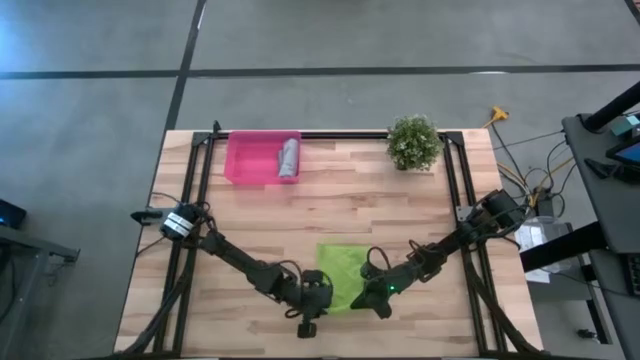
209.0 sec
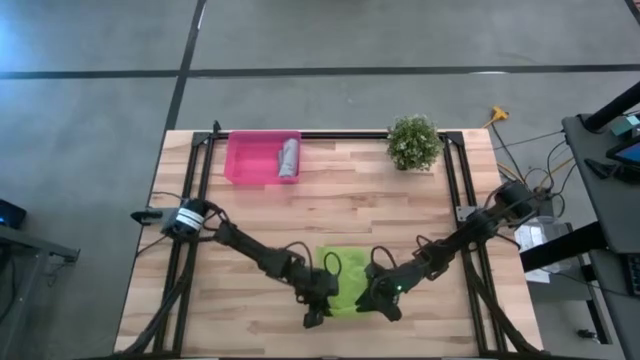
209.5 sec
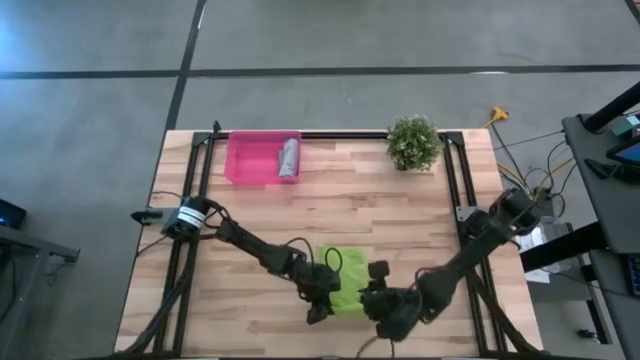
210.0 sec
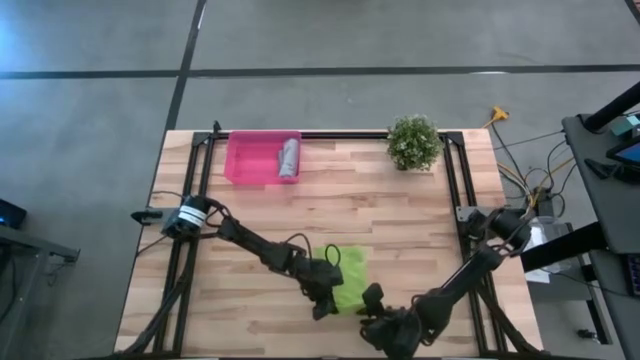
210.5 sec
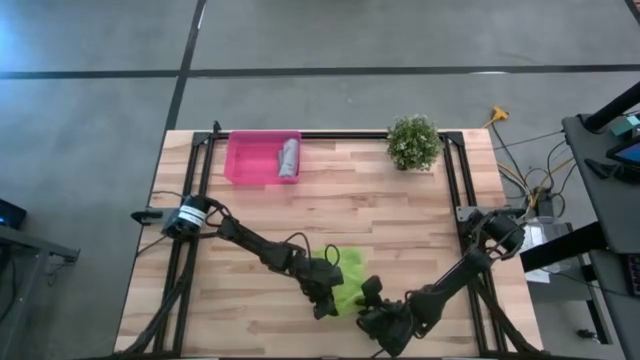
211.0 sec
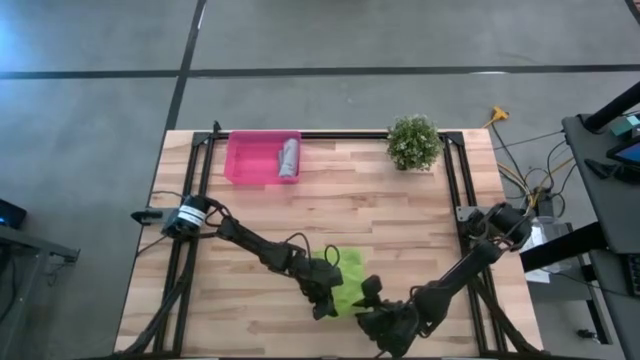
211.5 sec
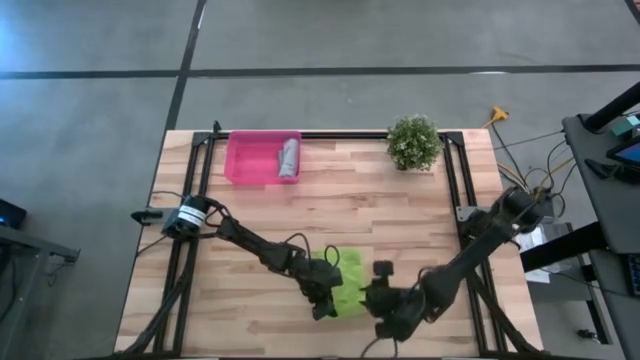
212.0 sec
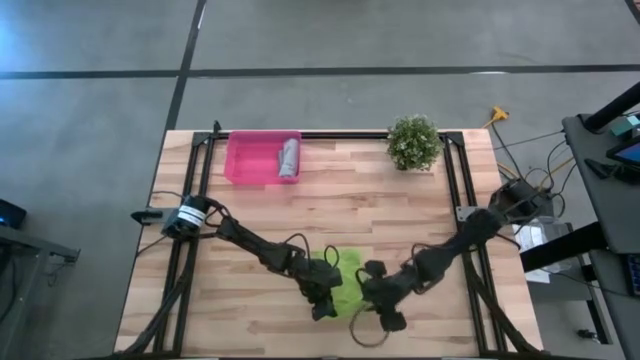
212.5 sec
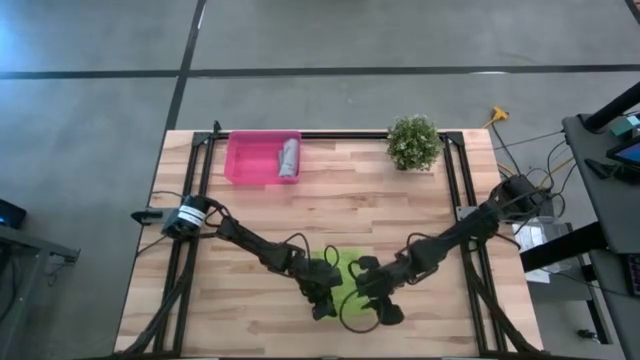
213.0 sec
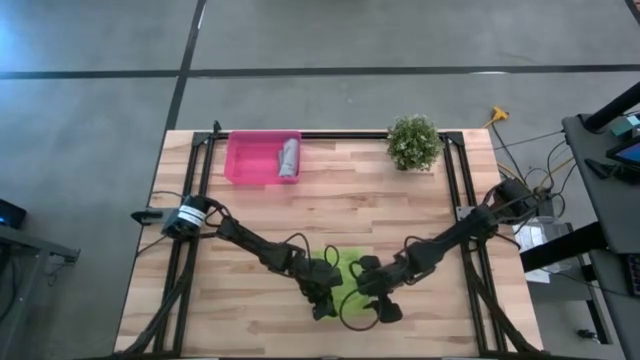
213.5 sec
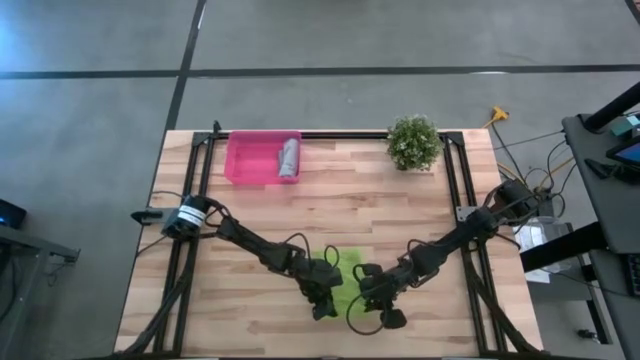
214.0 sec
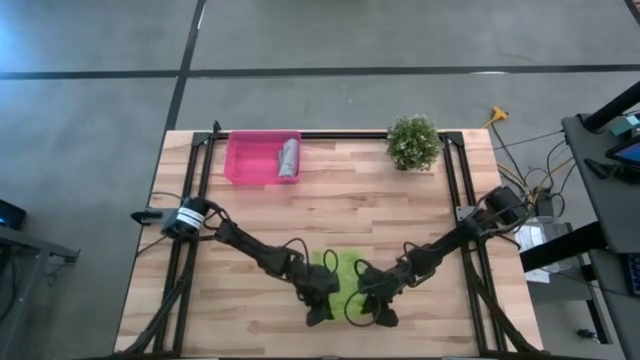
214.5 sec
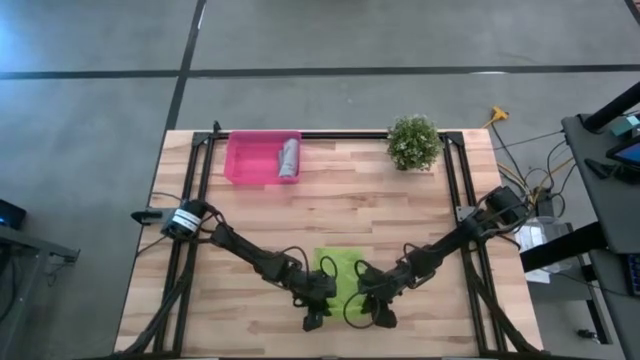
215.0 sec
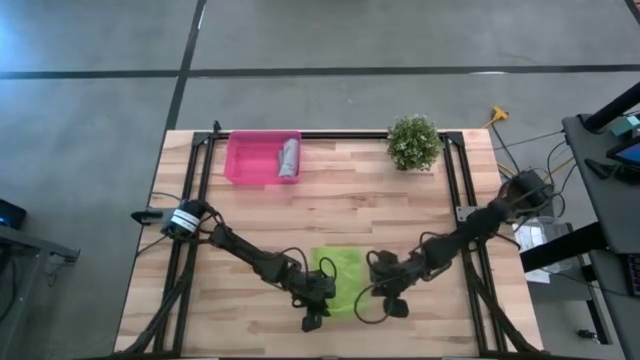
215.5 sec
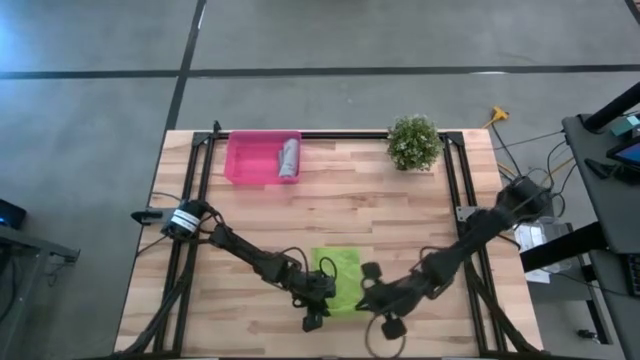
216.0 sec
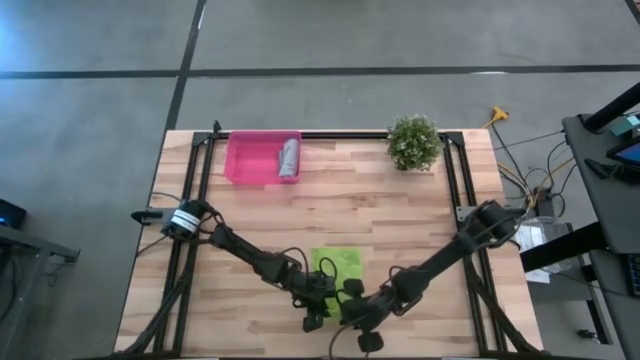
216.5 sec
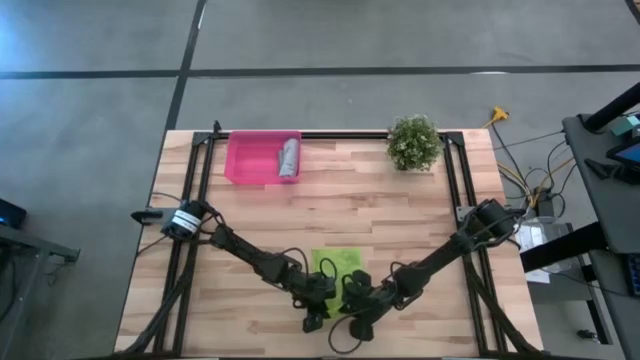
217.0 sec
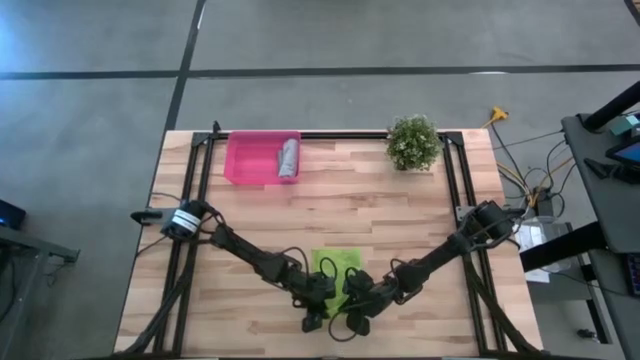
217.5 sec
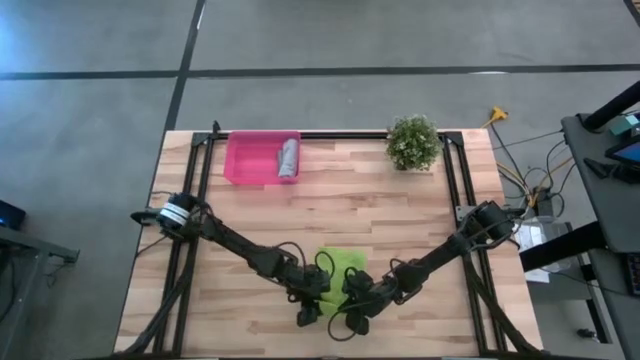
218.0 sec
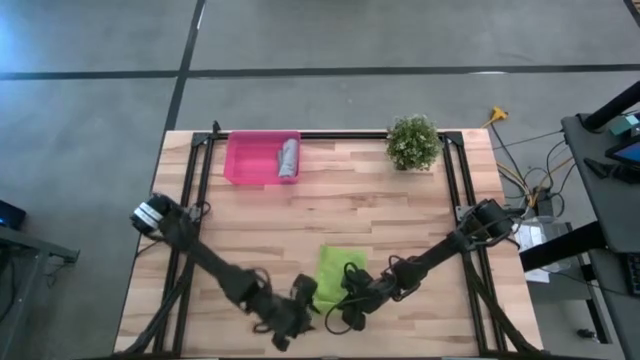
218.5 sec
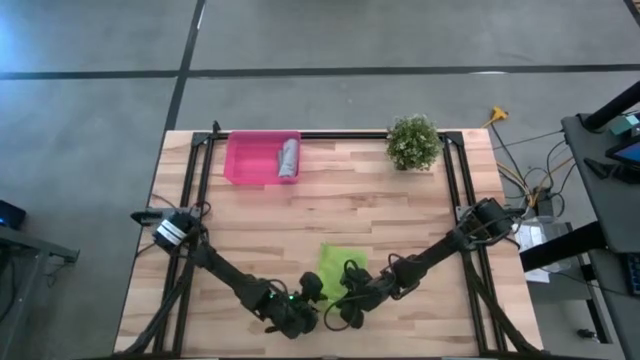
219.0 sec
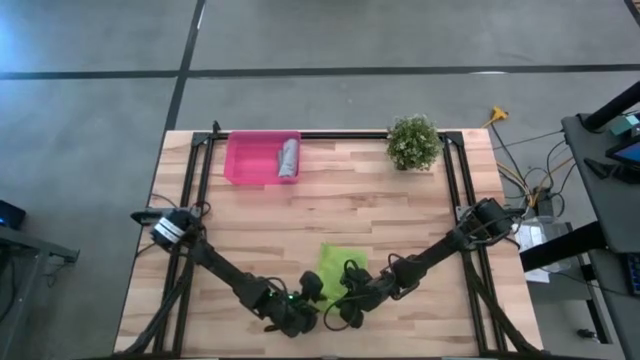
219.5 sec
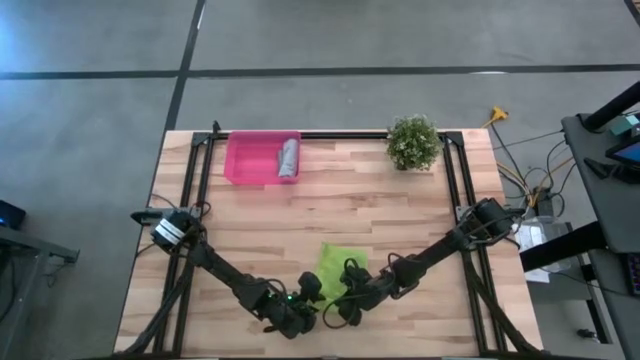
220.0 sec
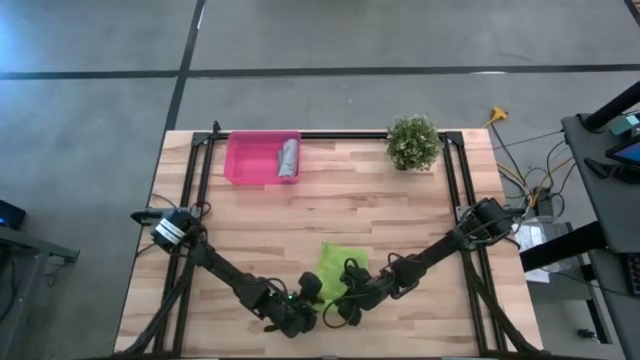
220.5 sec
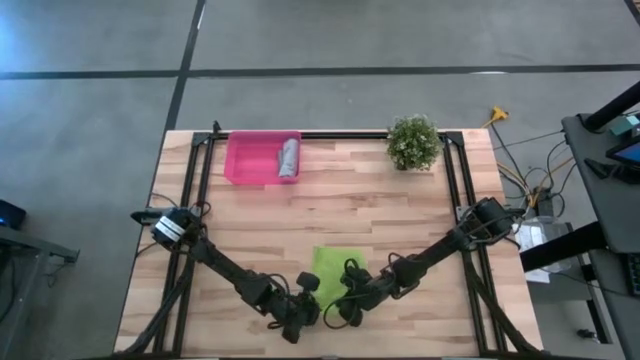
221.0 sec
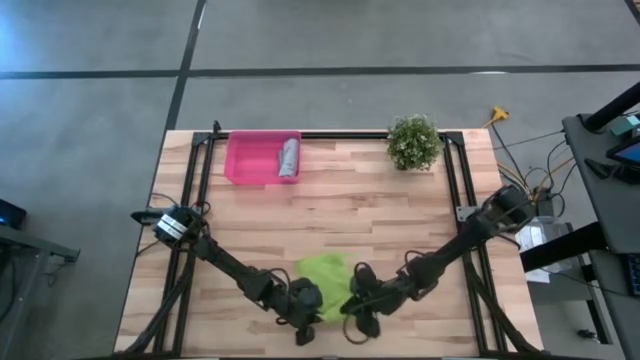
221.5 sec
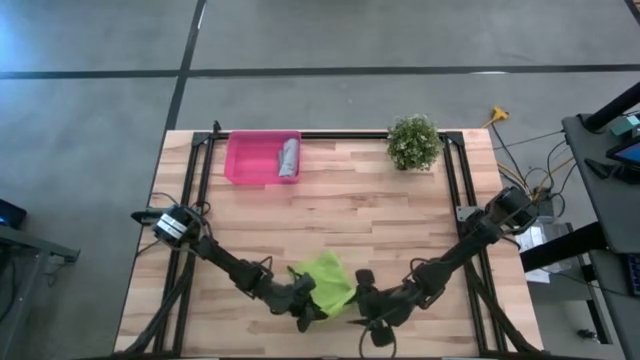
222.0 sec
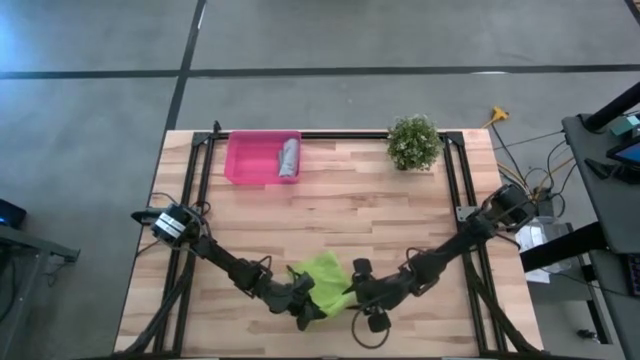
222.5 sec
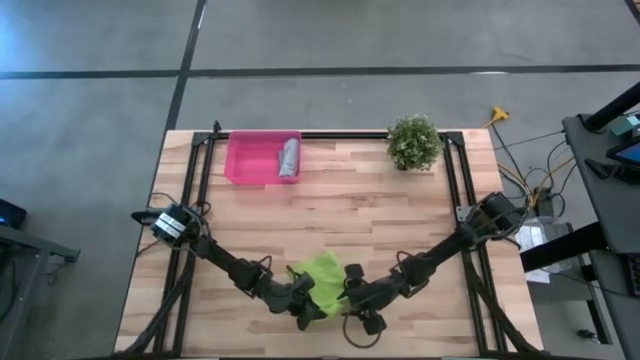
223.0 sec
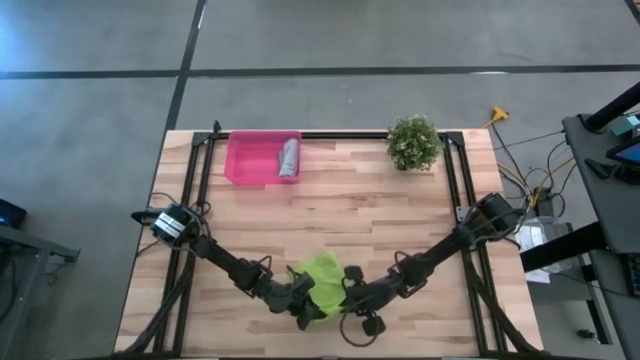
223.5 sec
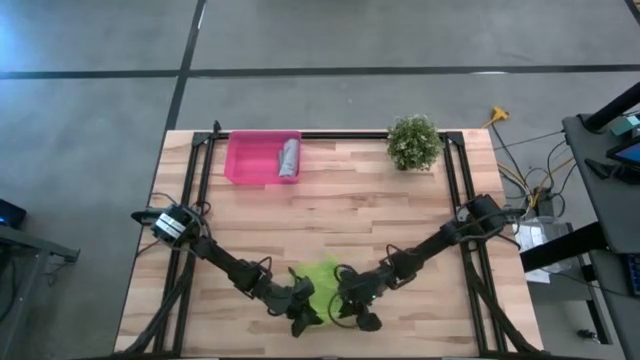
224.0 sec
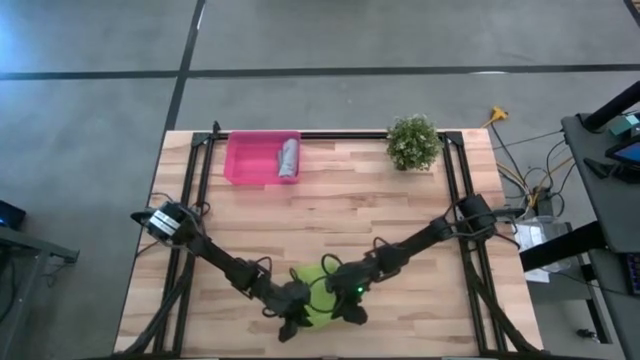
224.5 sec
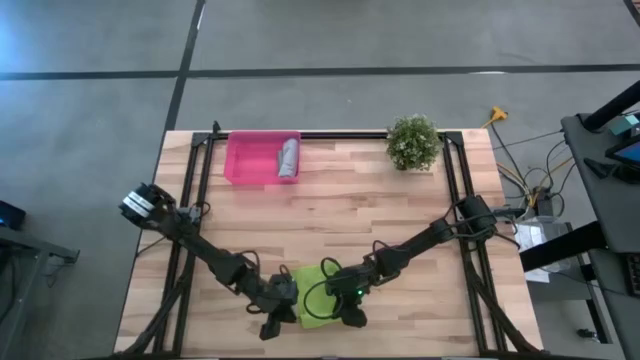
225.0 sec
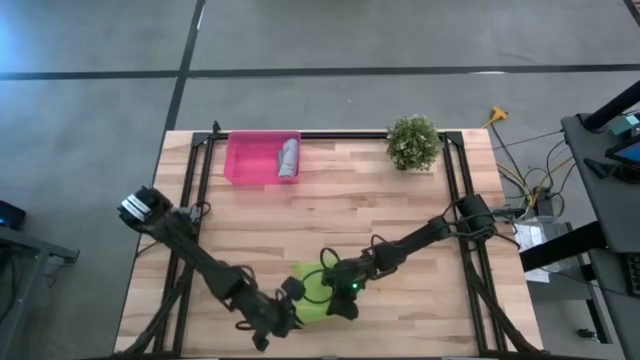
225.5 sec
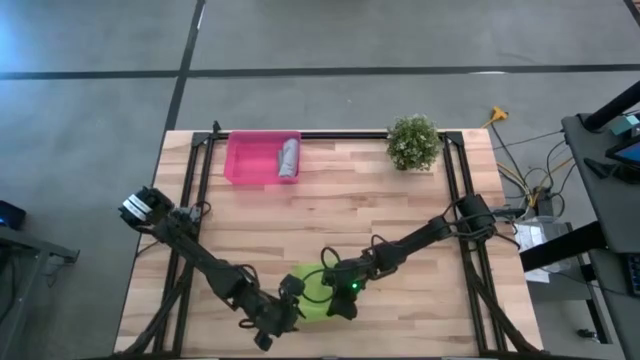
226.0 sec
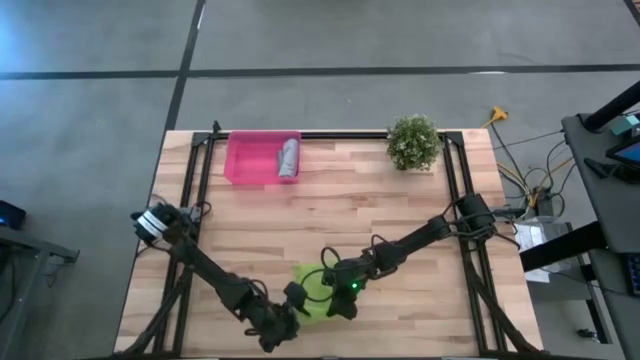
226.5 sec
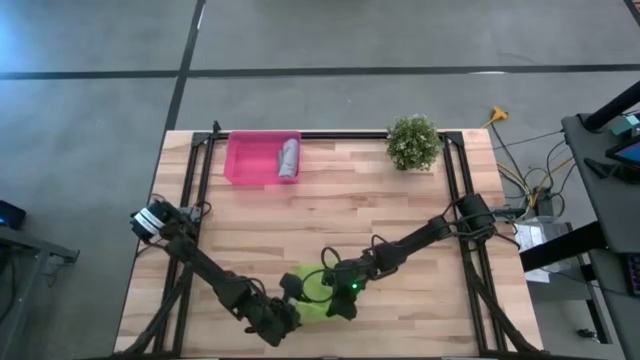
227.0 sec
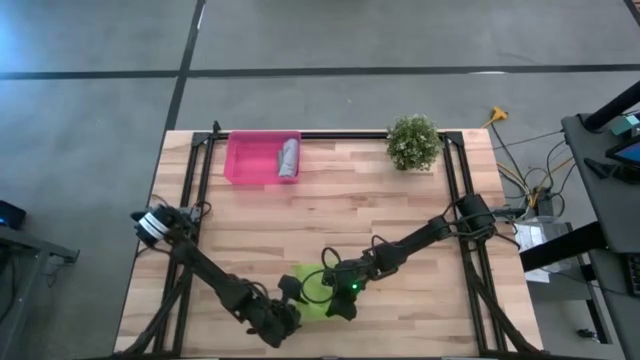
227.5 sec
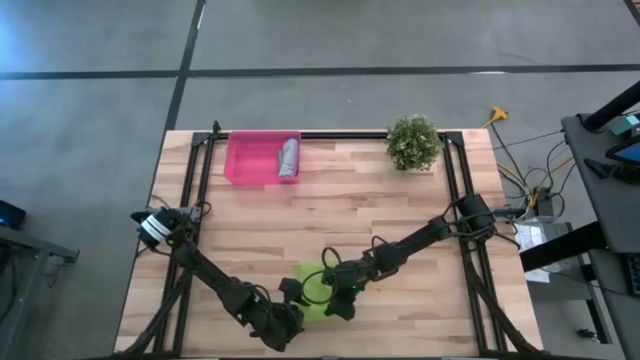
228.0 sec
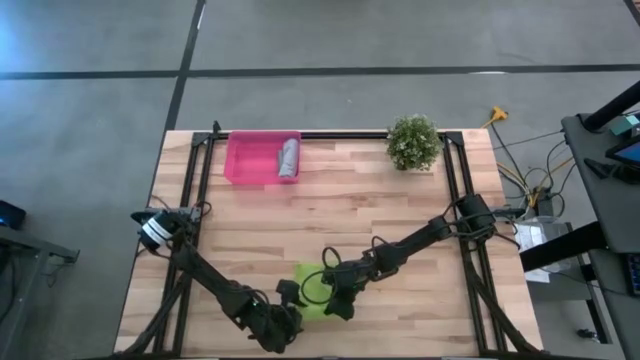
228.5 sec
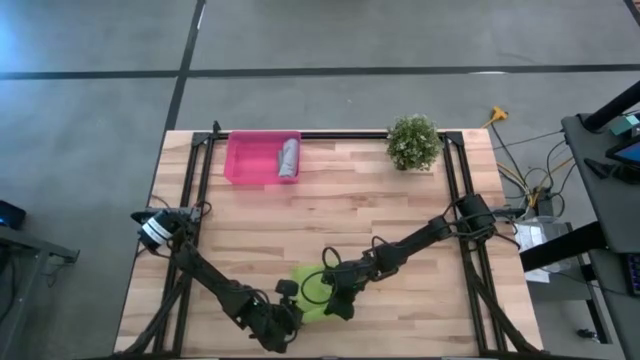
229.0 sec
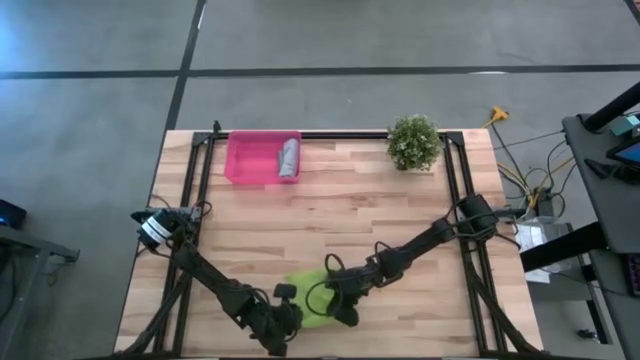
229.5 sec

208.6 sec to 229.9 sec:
Task: Roll microfiber towels into tight, uniform cylinder then place into a basket
Roll the green microfiber cloth
